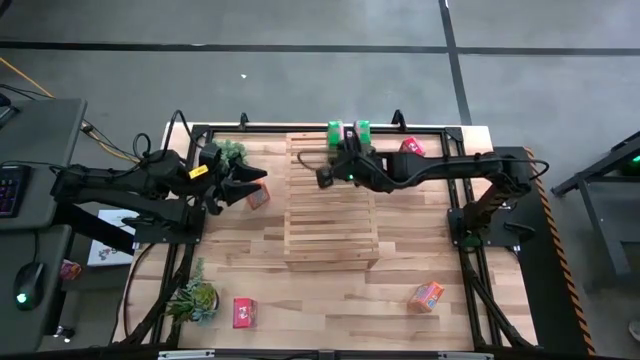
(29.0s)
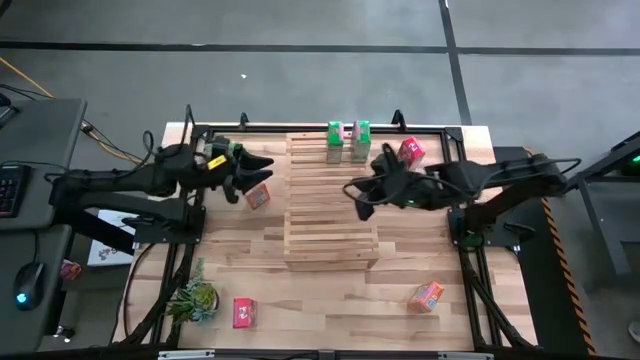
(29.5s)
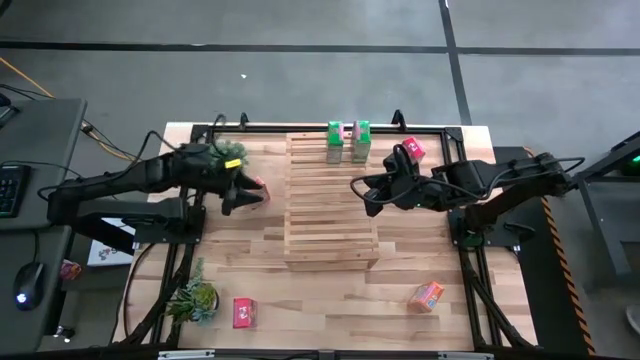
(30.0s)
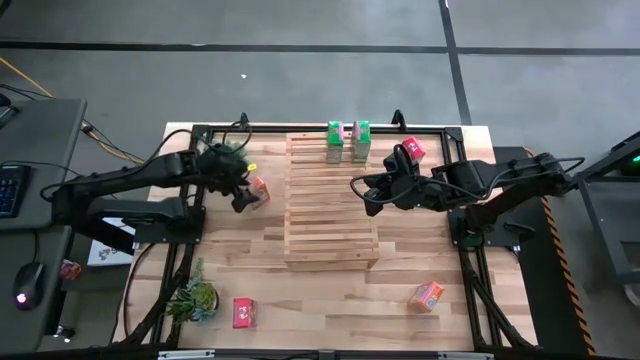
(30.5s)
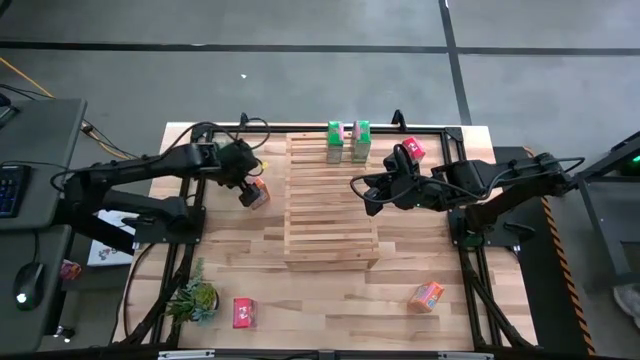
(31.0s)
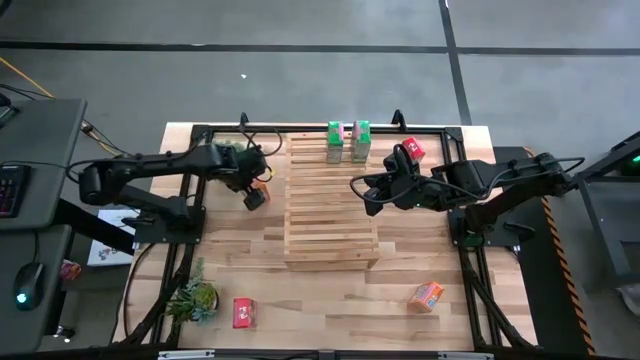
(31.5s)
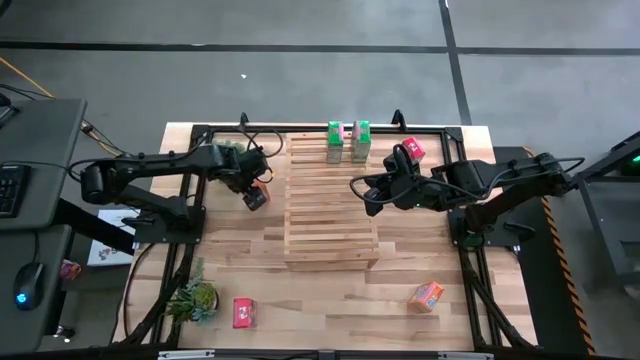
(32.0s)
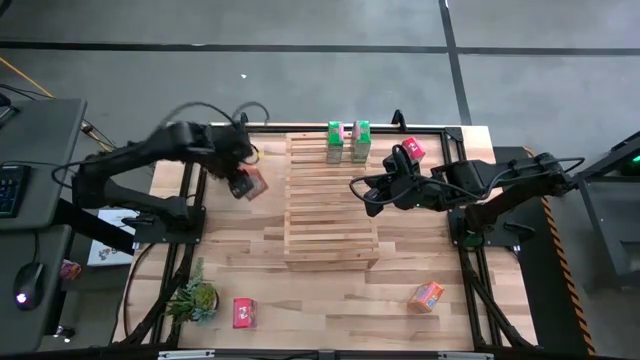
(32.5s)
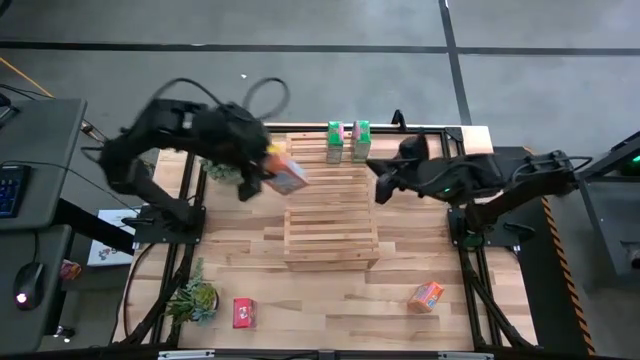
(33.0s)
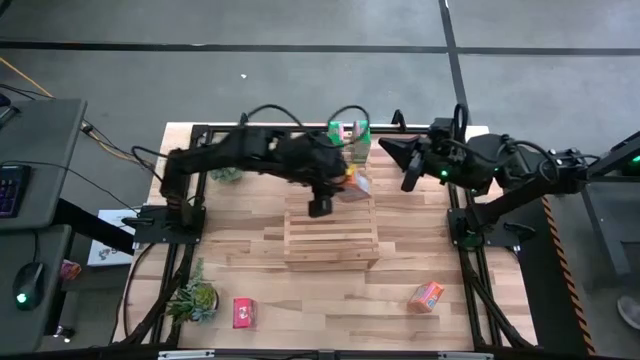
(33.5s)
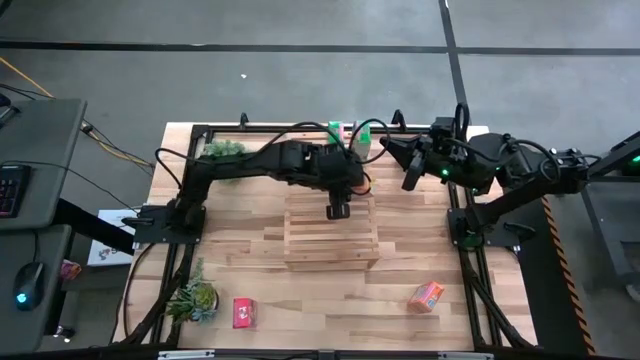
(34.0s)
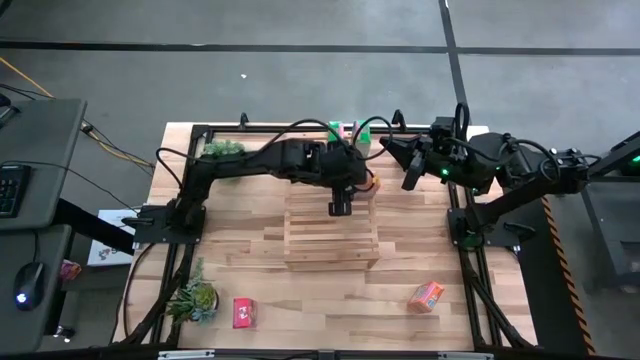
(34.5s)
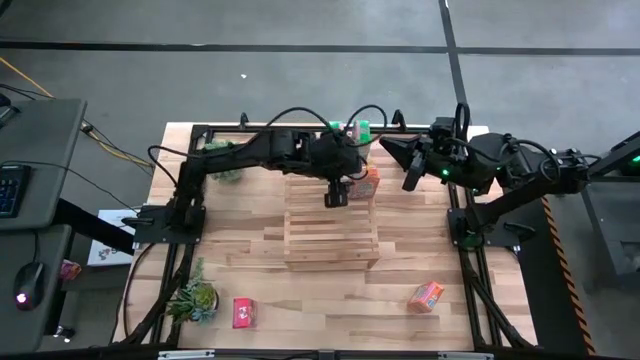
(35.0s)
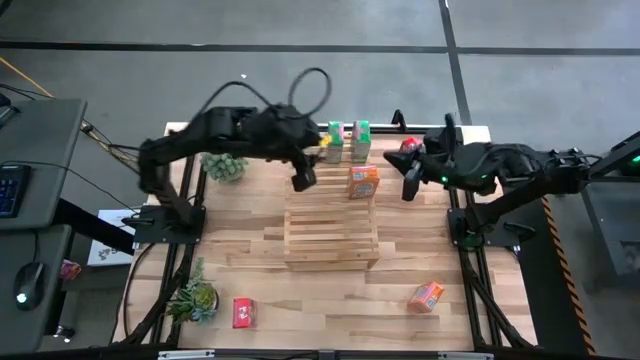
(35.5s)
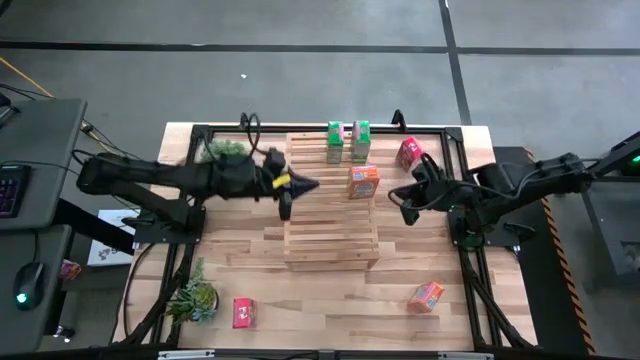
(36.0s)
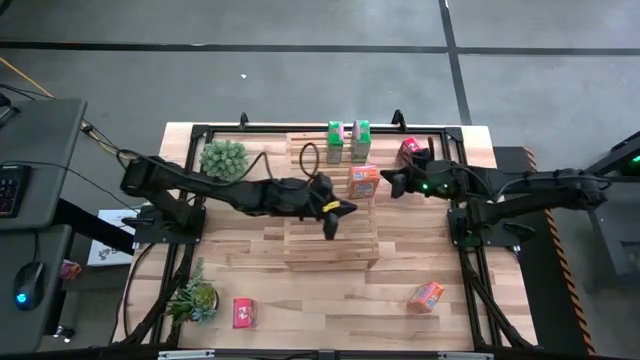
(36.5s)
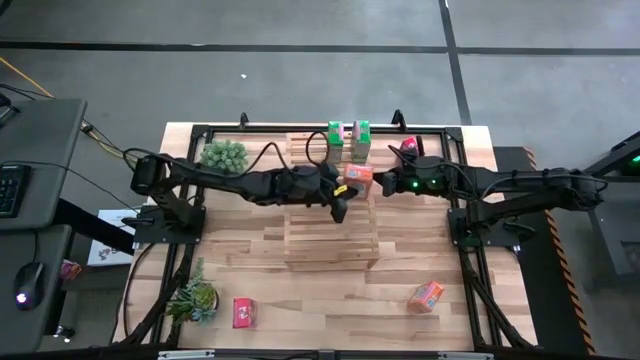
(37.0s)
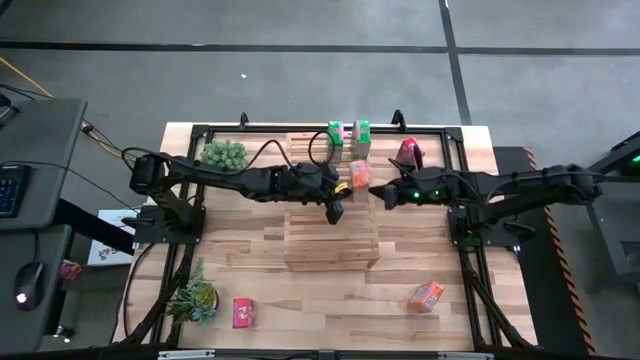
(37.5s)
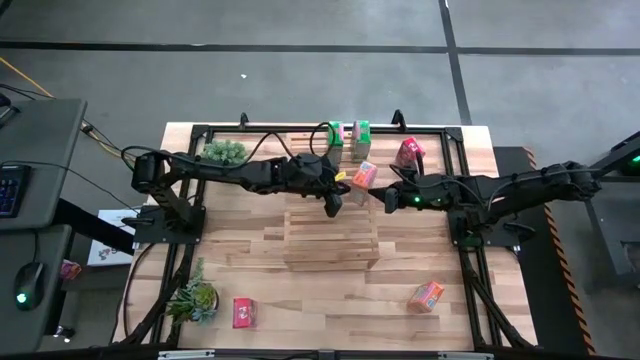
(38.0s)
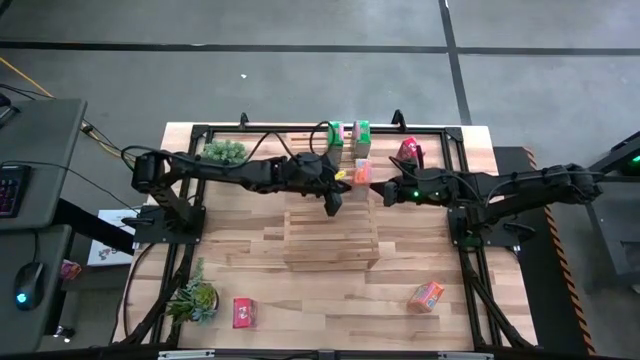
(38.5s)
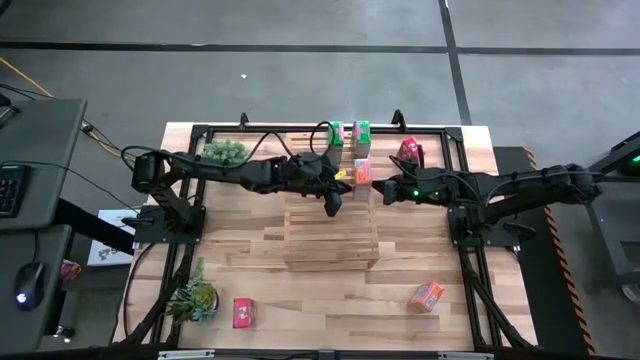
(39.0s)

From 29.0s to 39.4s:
Task: Stack cereal on shelf
Put the left orange cereal box on the shelf

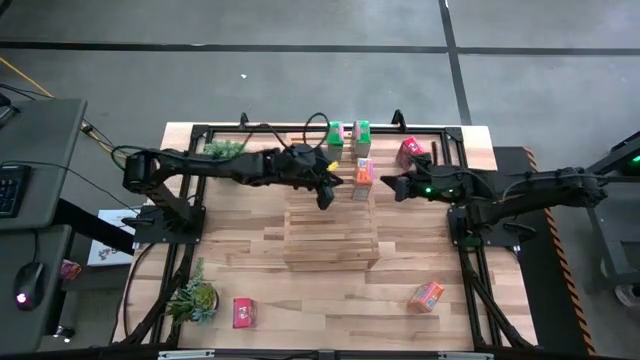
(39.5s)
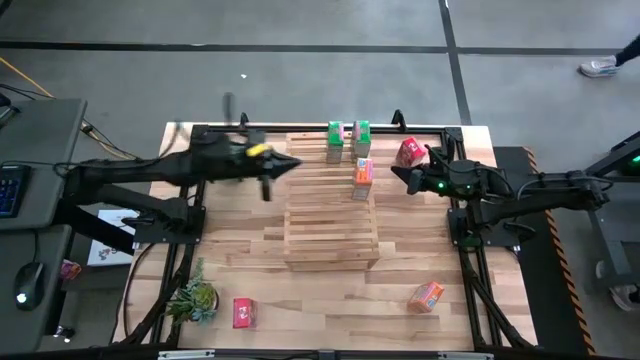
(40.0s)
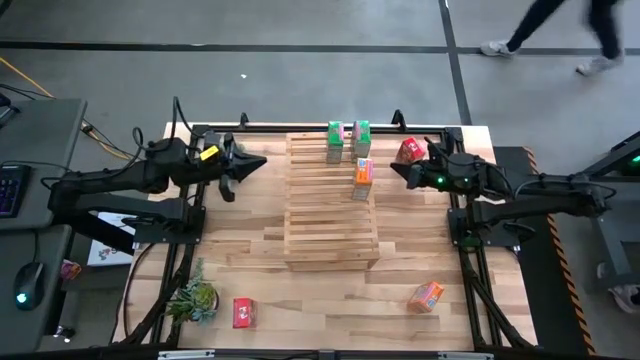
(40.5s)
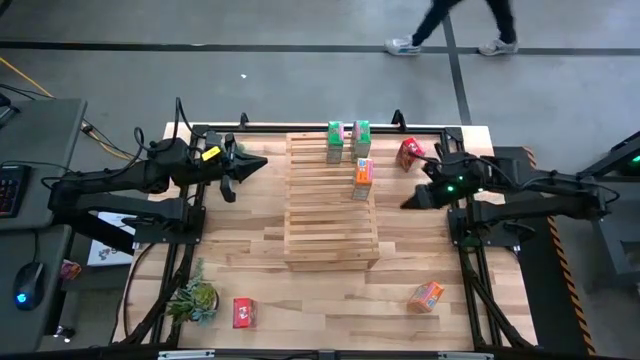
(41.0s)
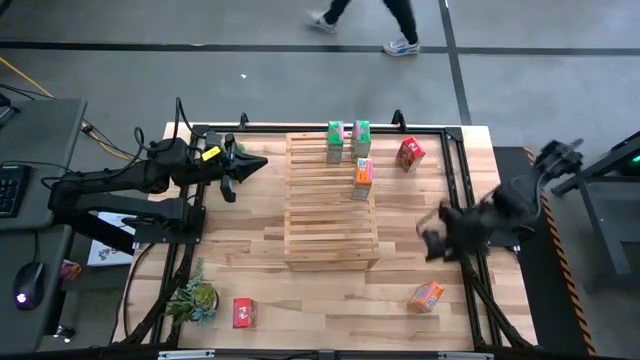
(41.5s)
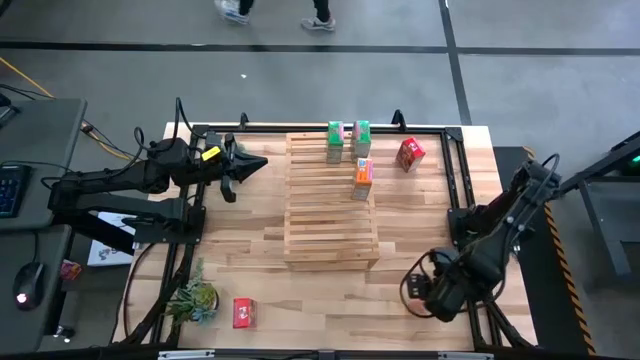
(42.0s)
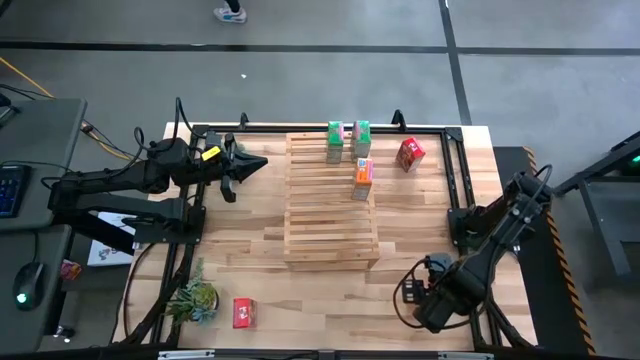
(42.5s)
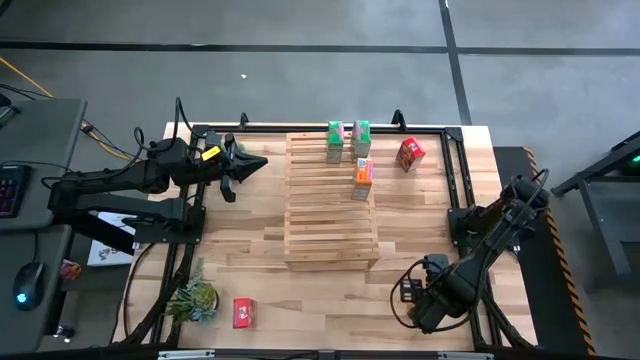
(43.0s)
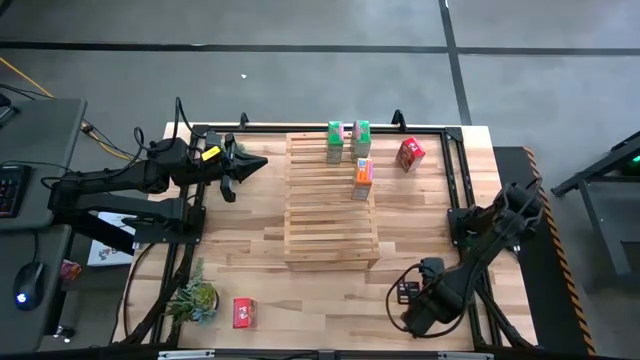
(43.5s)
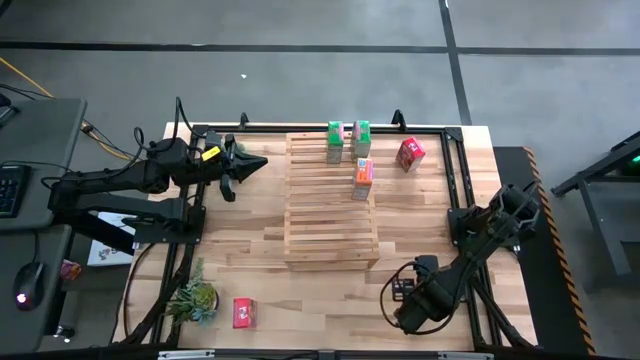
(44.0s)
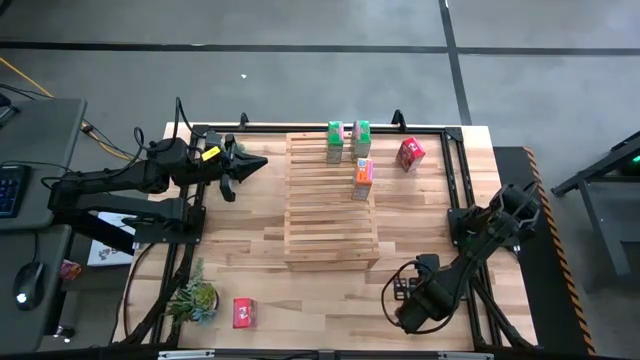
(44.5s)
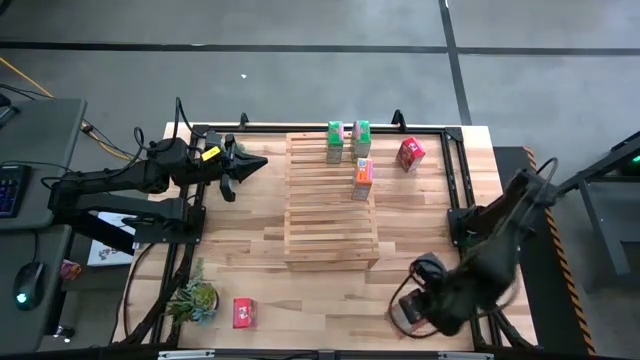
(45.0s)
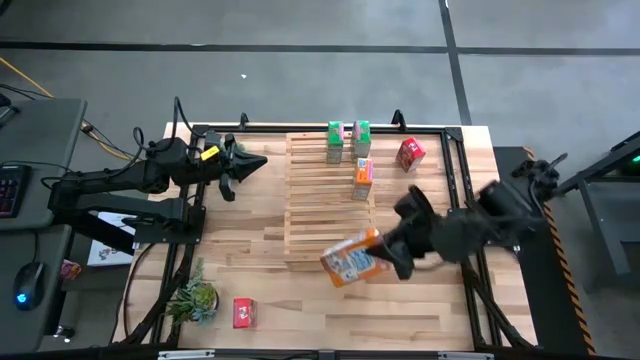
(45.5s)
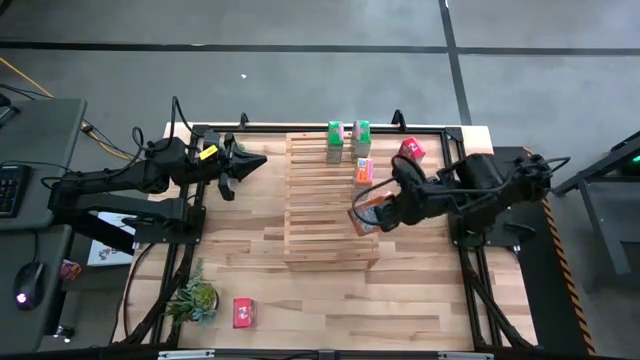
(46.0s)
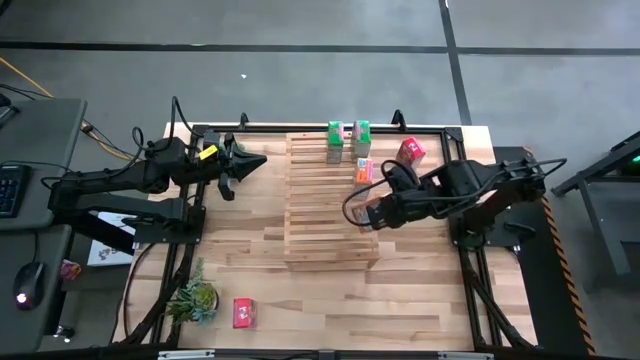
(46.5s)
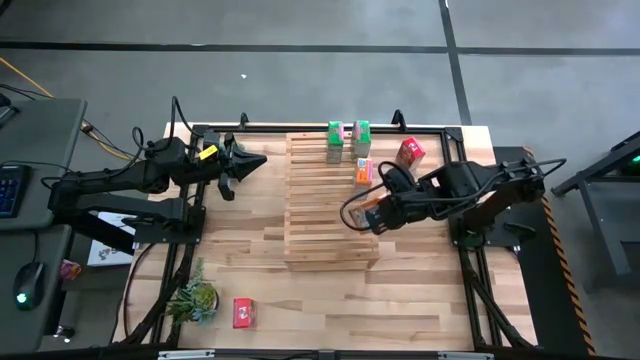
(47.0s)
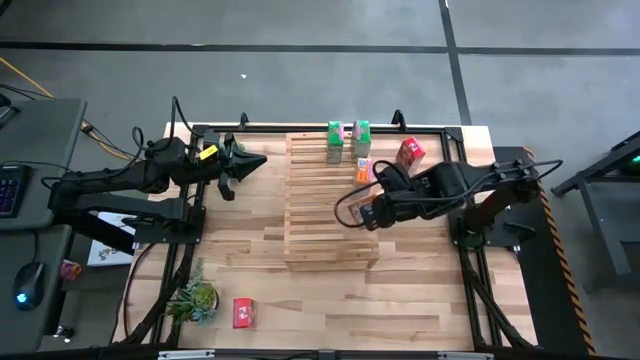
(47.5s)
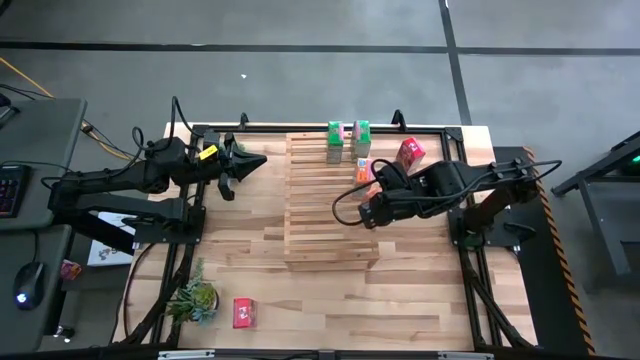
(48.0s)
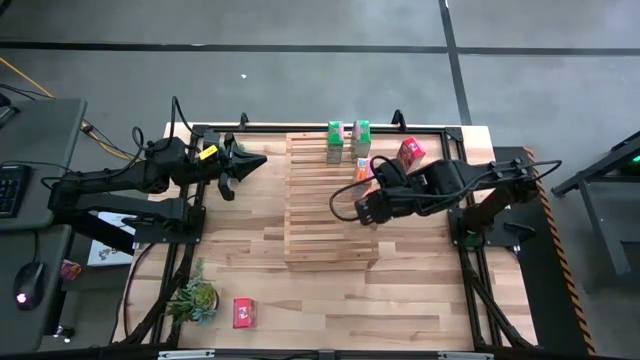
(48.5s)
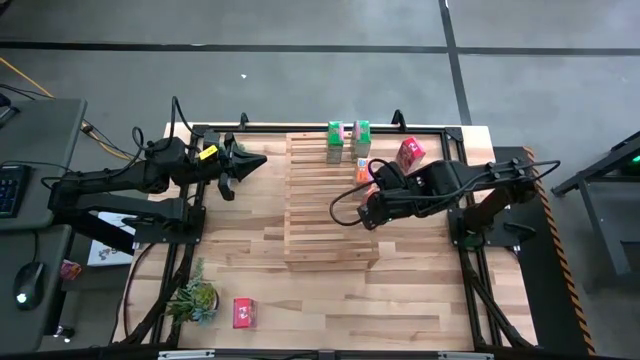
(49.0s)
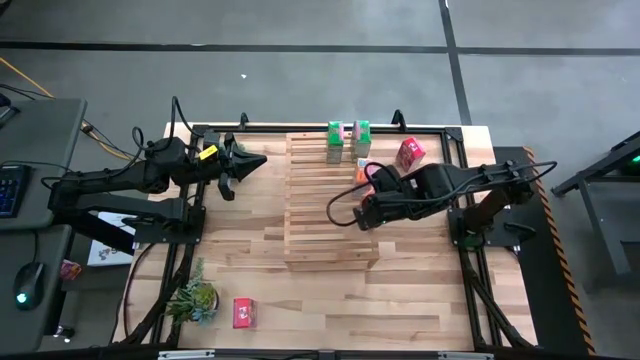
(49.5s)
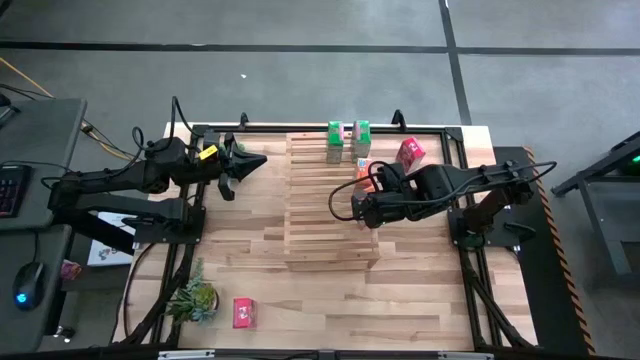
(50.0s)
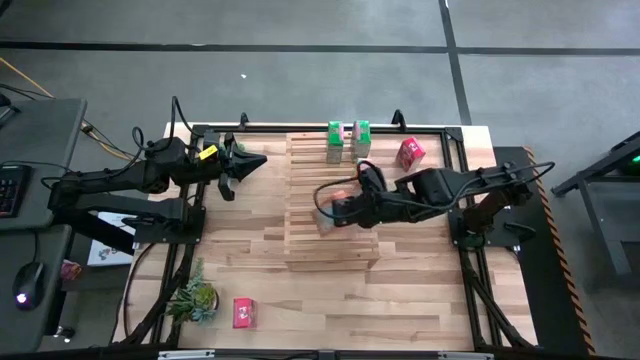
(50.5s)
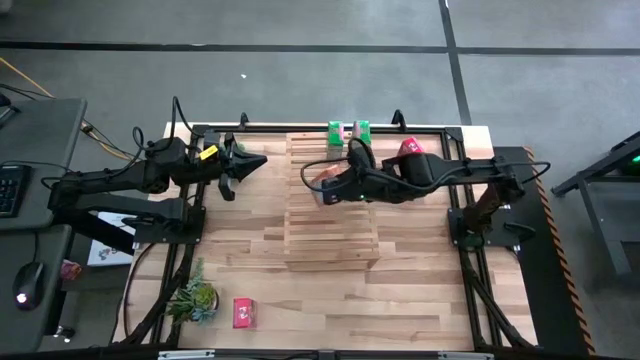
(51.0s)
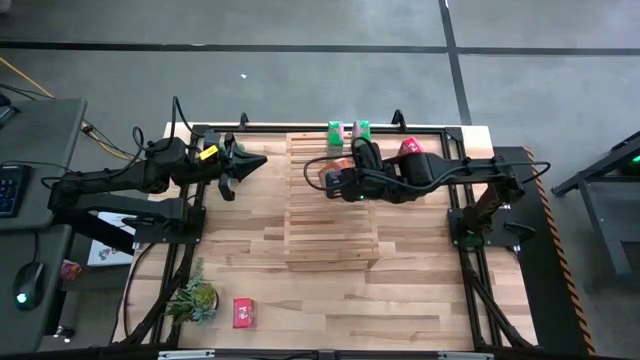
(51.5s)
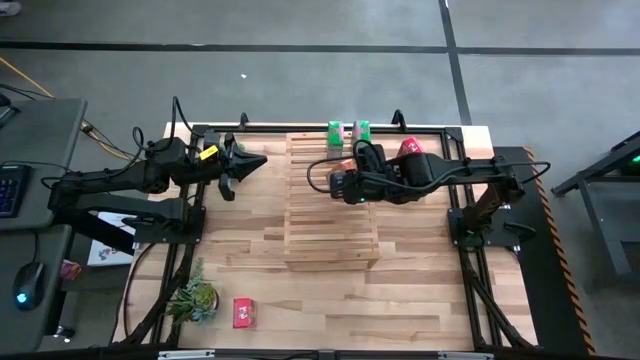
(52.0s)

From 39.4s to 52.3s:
Put the orange cereal box on the shelf
